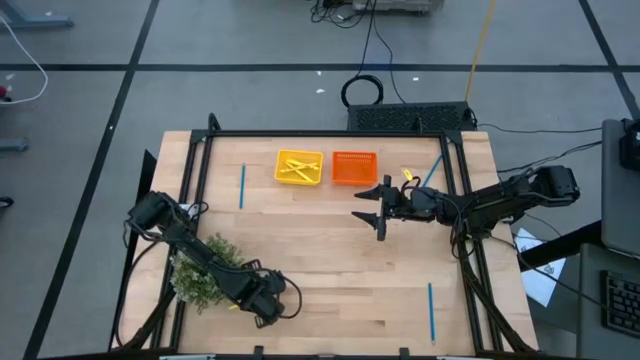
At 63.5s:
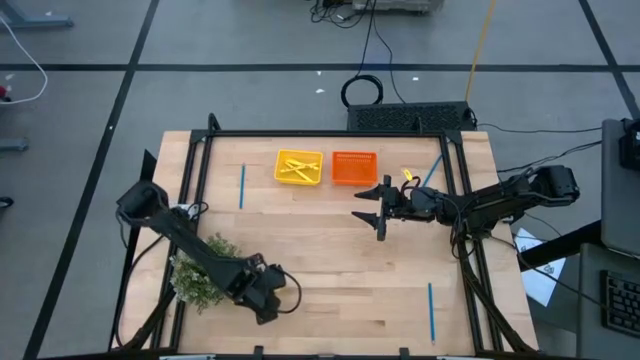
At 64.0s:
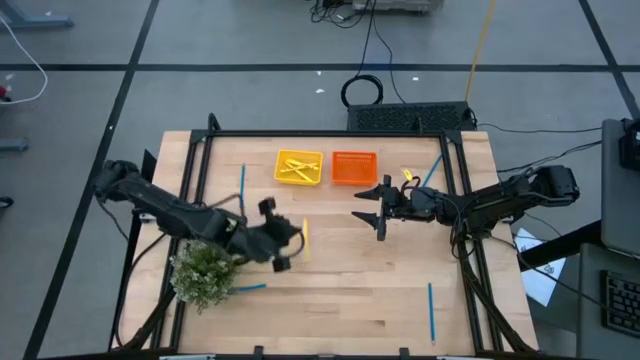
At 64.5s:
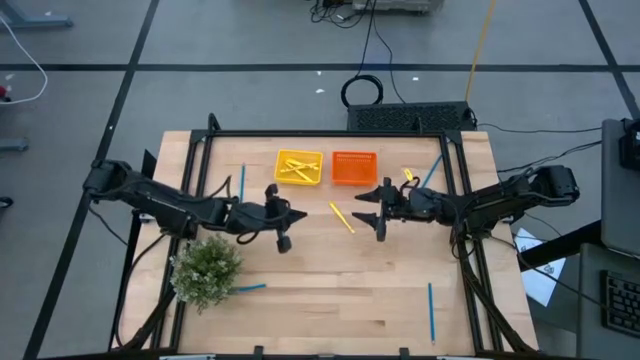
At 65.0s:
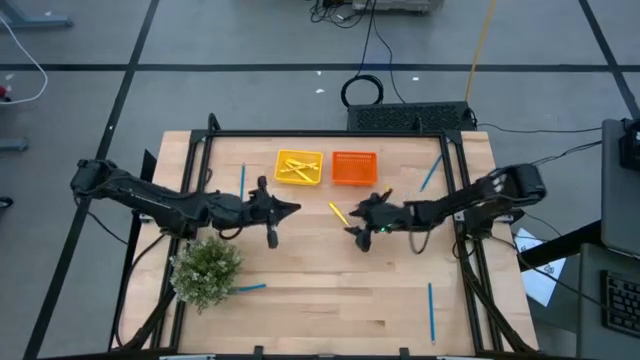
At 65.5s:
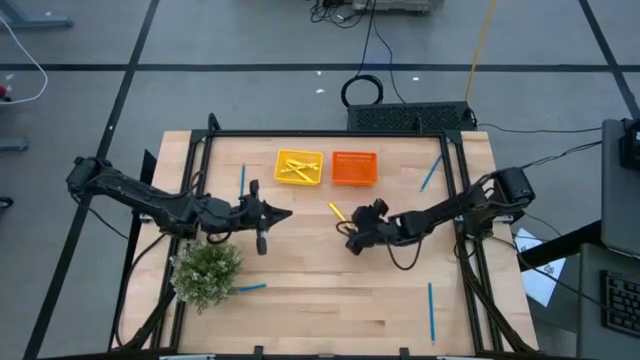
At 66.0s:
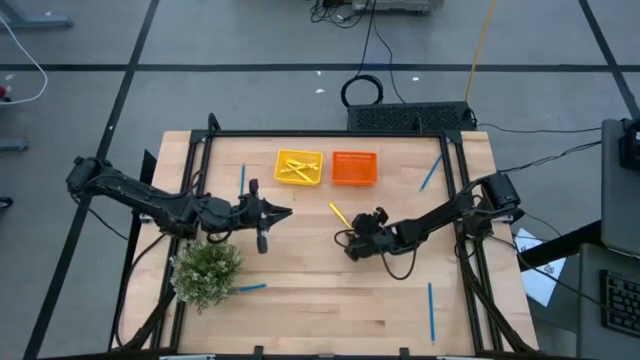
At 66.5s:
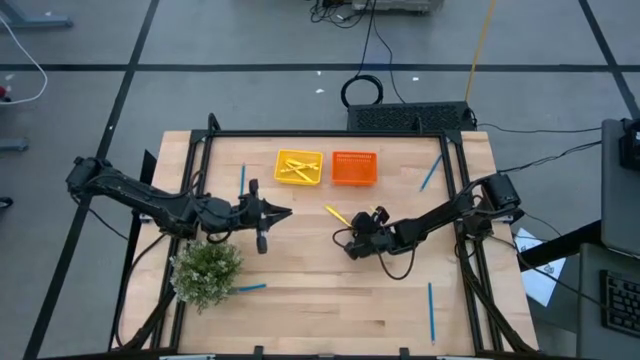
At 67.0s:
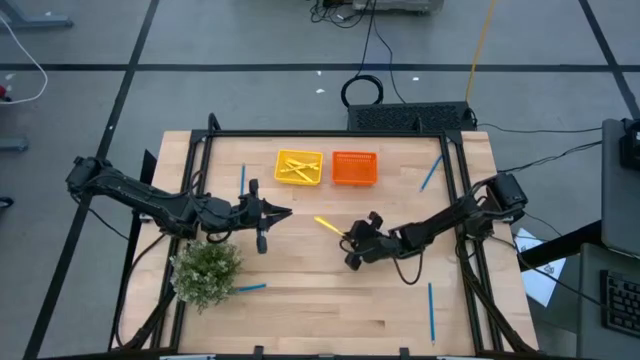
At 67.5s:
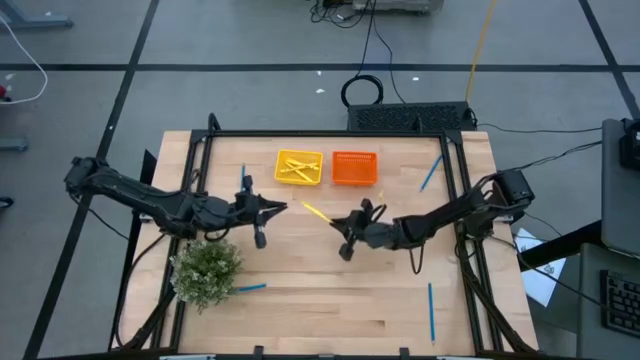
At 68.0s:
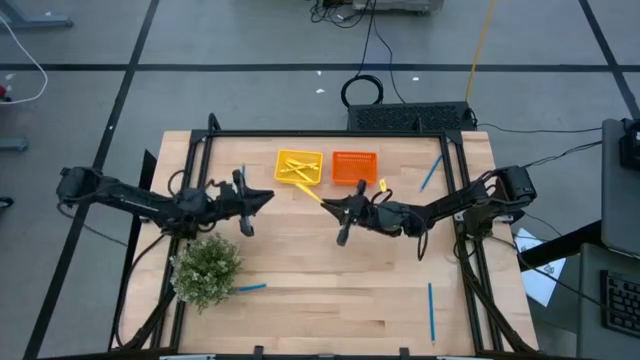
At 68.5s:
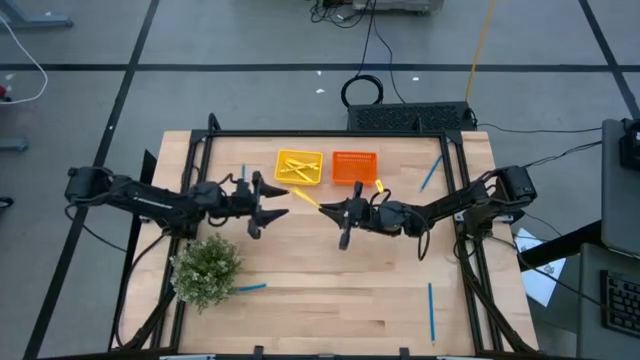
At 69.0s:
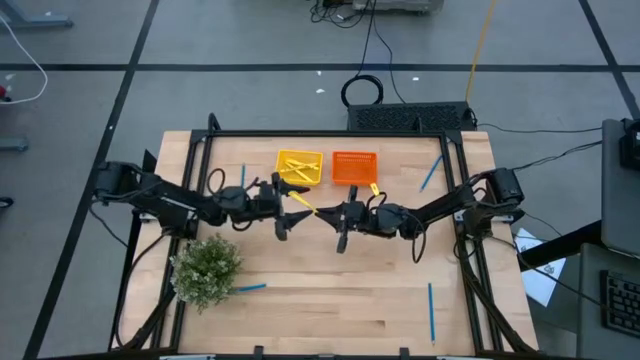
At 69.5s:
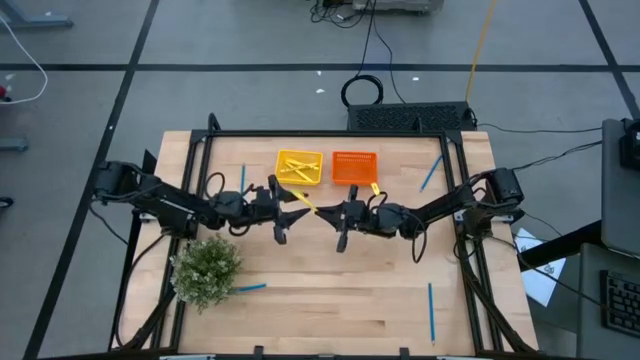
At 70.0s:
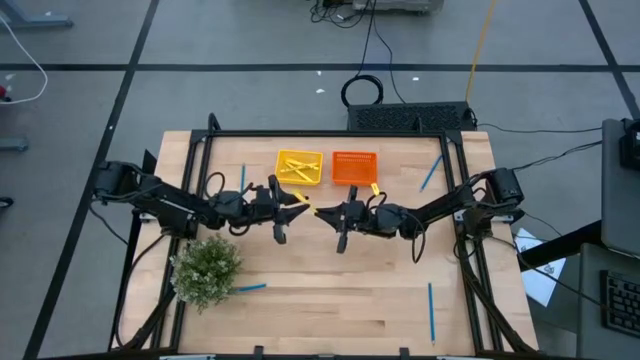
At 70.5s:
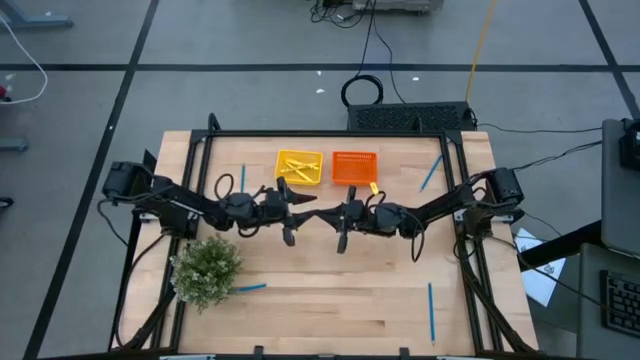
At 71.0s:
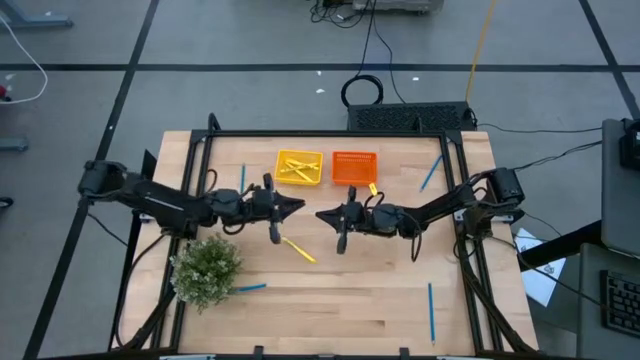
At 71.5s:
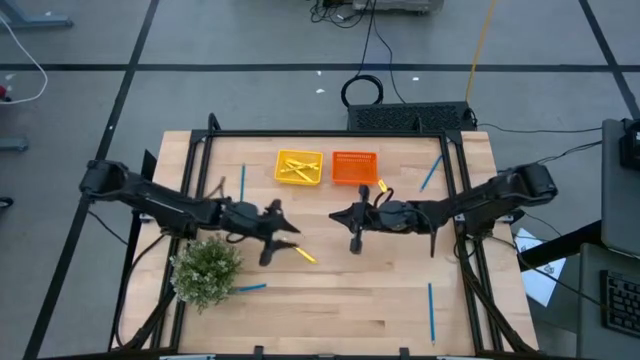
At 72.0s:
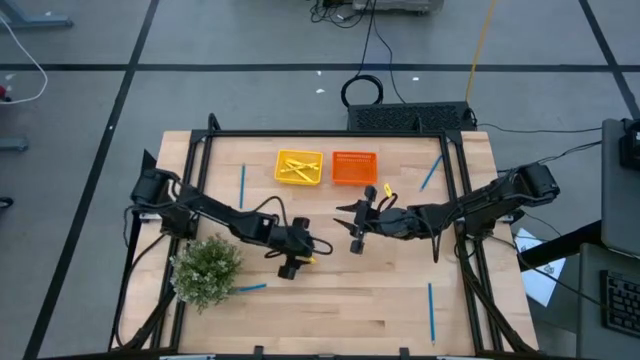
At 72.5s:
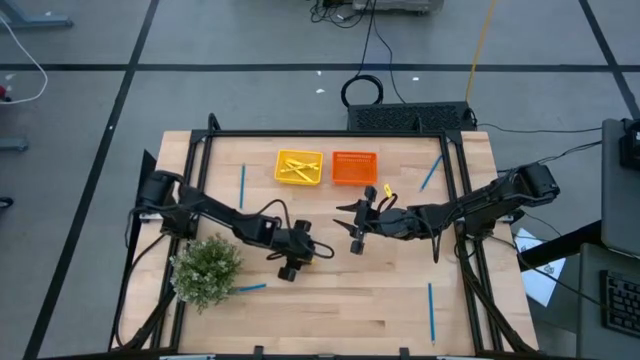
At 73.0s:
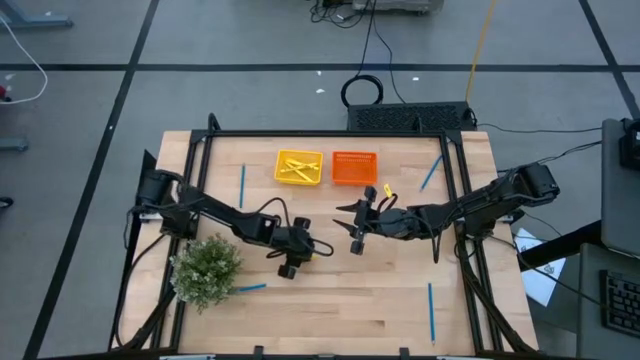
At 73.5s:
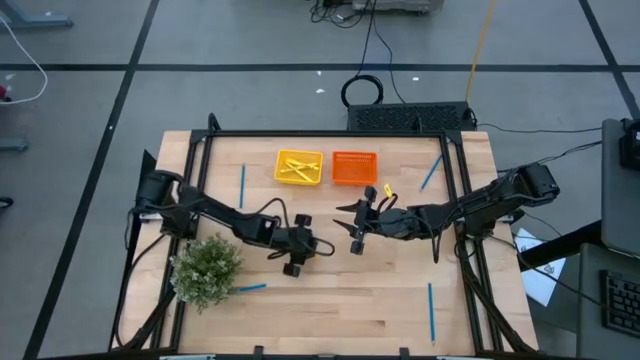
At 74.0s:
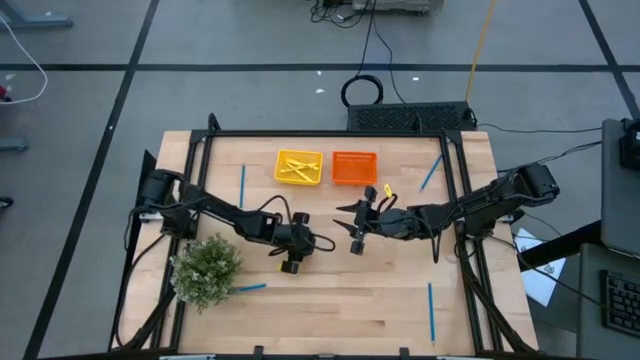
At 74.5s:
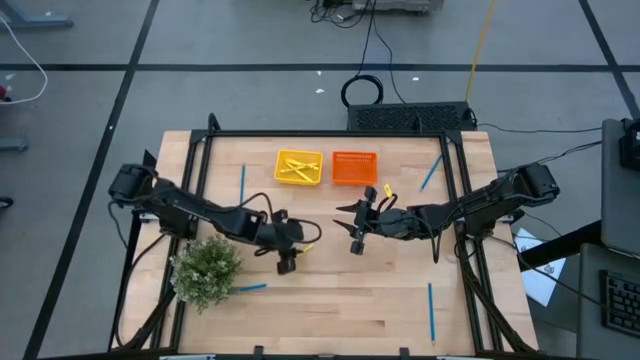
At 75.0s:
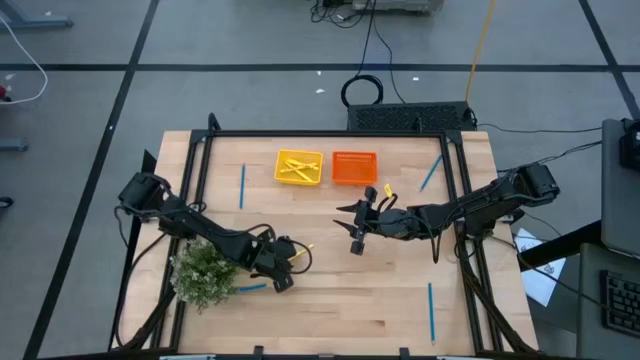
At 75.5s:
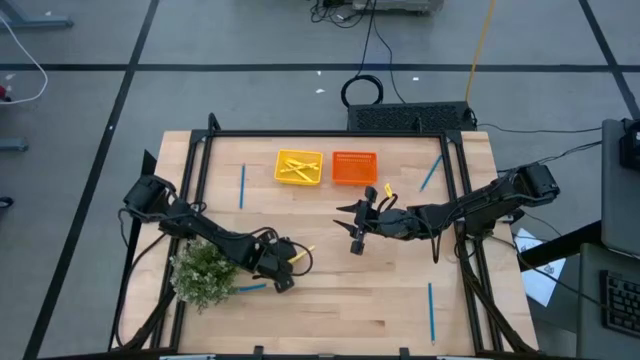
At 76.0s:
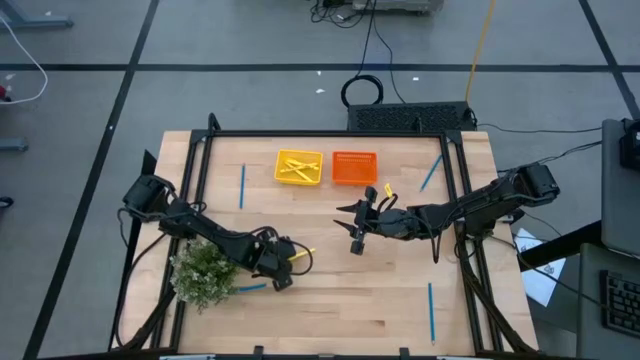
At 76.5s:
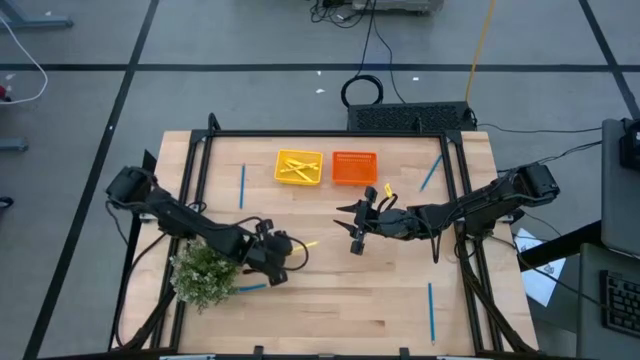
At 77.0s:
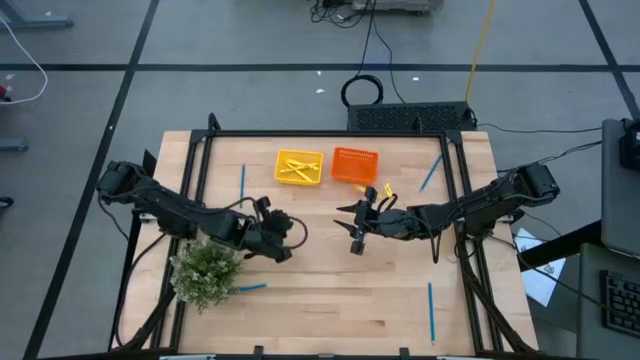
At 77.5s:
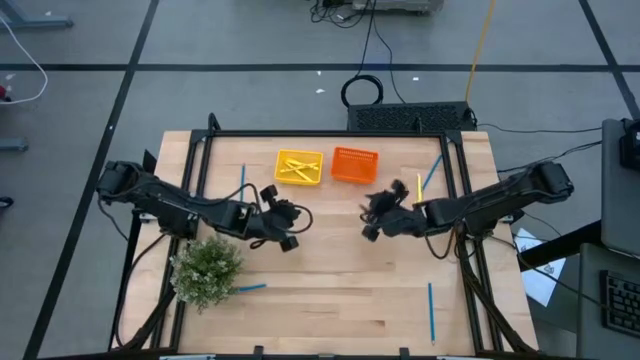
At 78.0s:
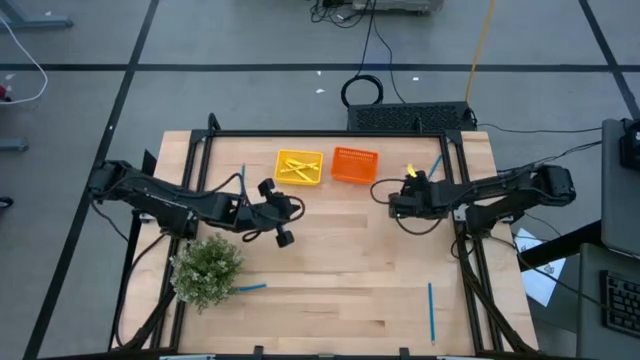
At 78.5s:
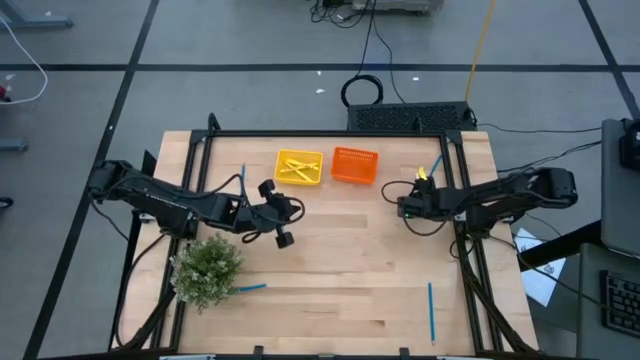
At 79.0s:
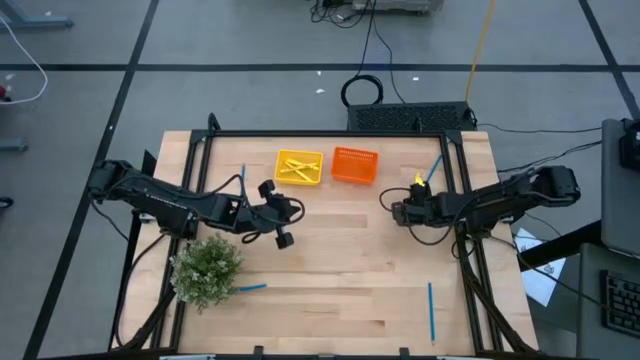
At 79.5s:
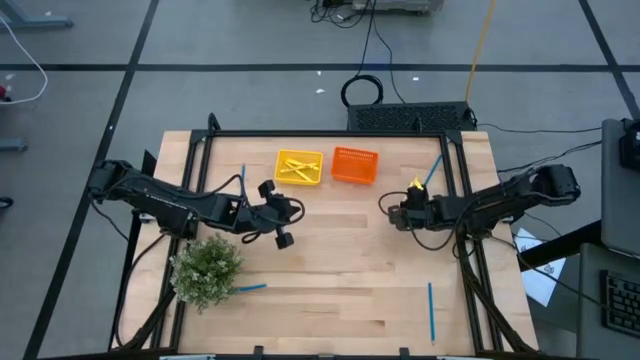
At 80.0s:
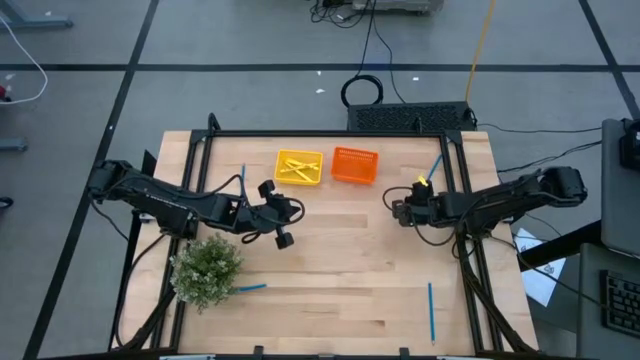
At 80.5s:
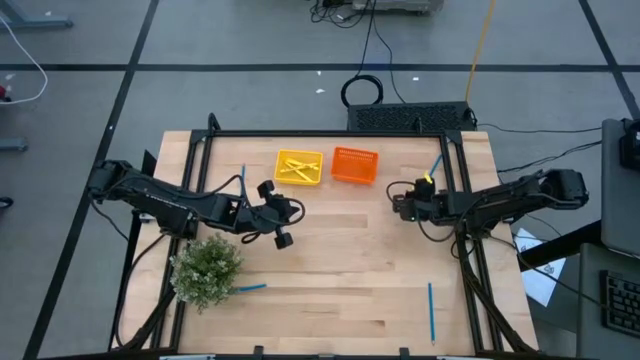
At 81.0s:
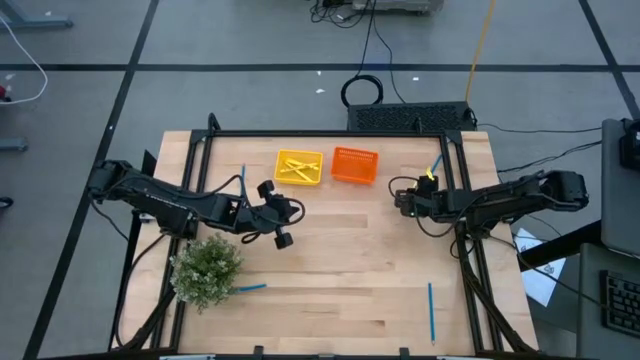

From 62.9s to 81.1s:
Task: Sort pens & pencils
Put the yellow pen into the yellow bin

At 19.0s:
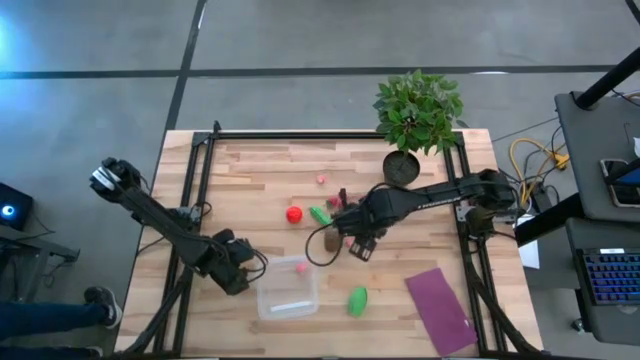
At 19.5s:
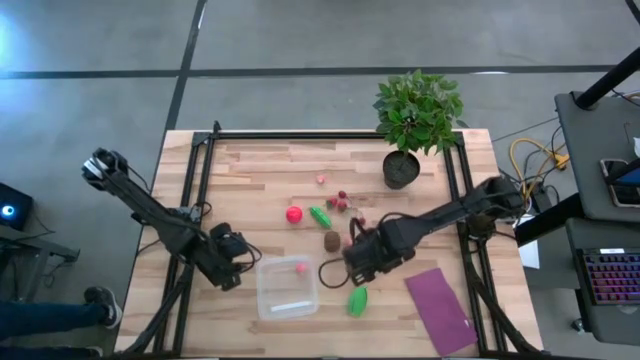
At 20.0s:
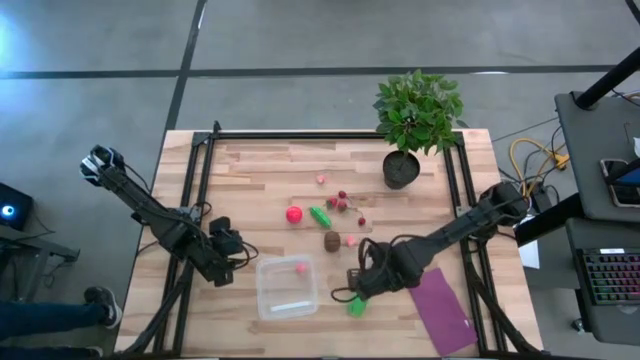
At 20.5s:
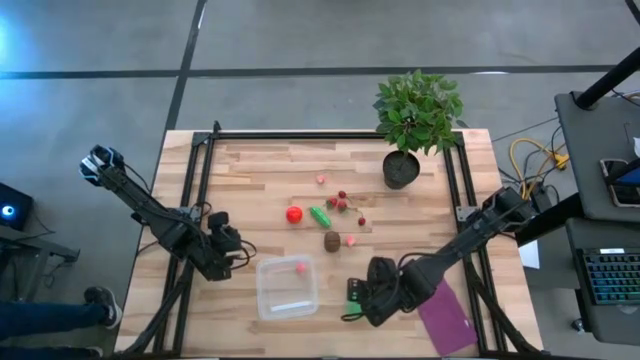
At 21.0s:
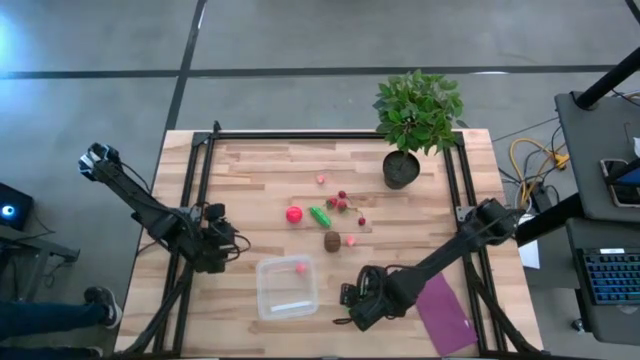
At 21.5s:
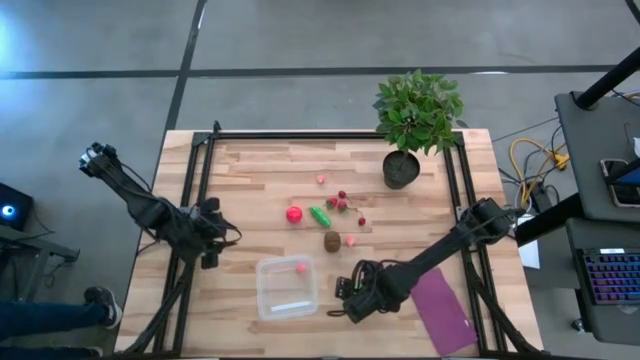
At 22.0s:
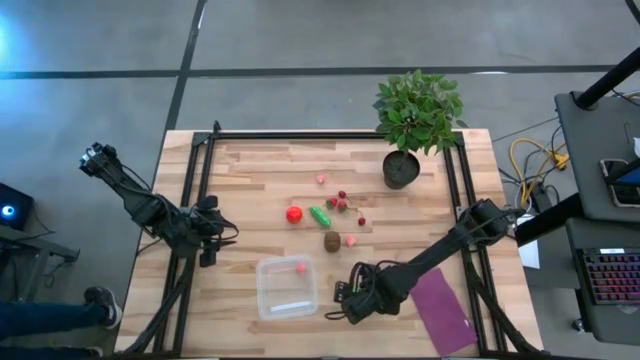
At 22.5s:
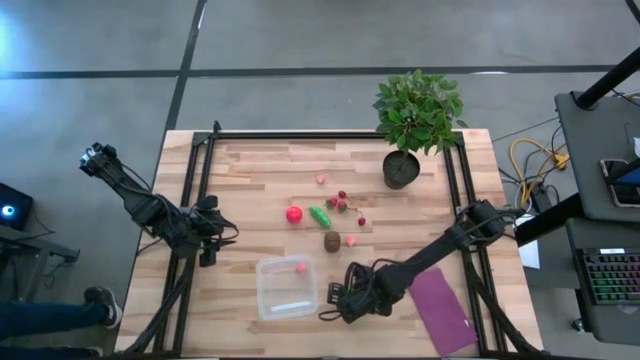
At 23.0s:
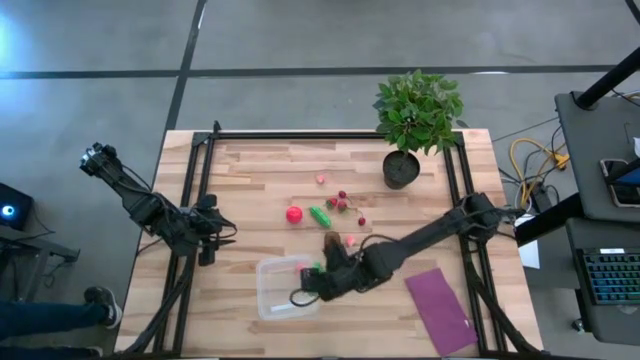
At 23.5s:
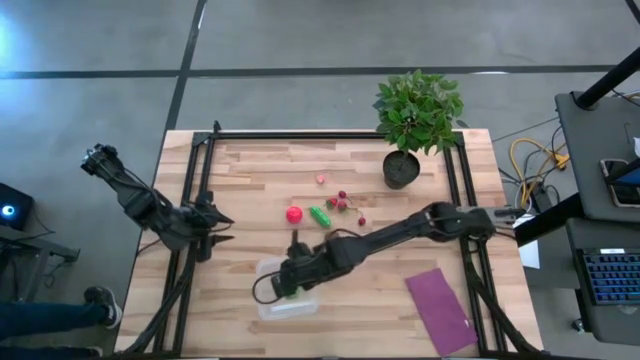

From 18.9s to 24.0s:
Task: Pick and placing Produce into tupperware
Put the corn into the transparent bin
